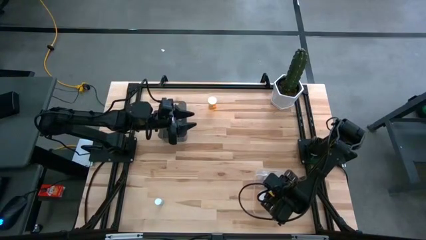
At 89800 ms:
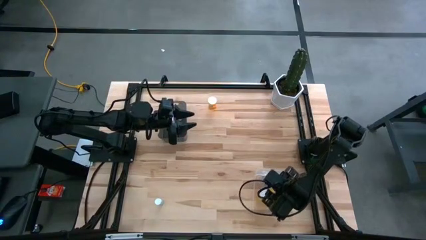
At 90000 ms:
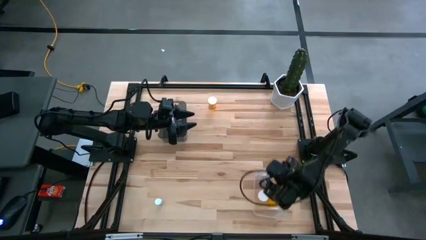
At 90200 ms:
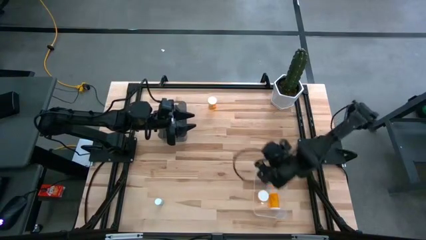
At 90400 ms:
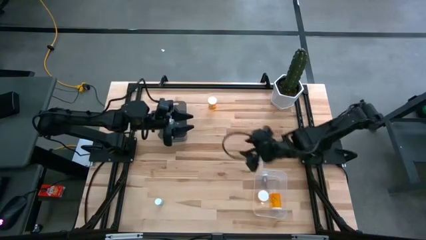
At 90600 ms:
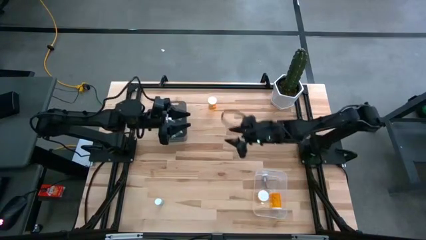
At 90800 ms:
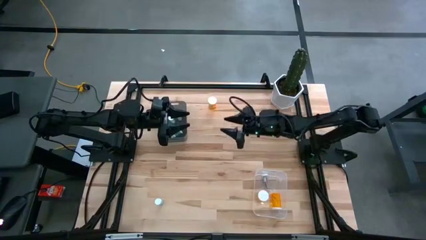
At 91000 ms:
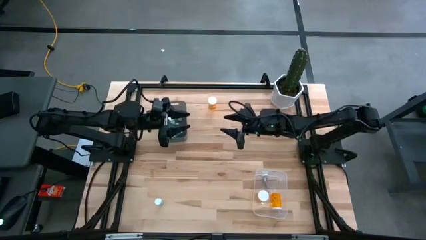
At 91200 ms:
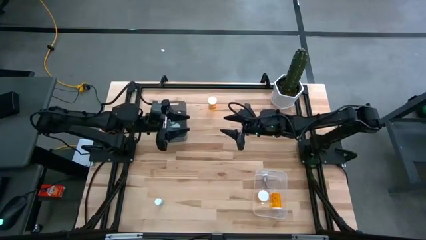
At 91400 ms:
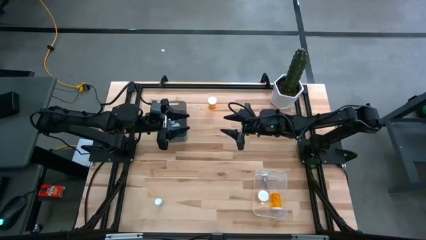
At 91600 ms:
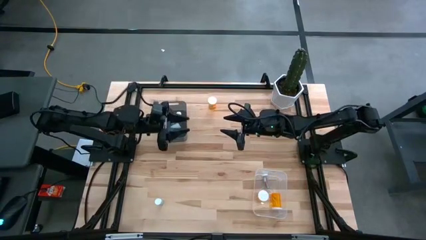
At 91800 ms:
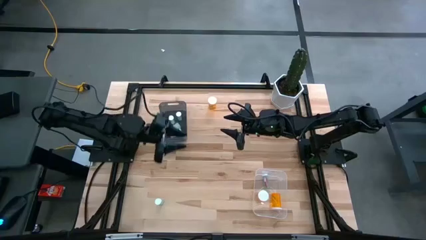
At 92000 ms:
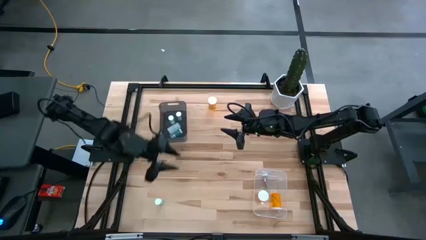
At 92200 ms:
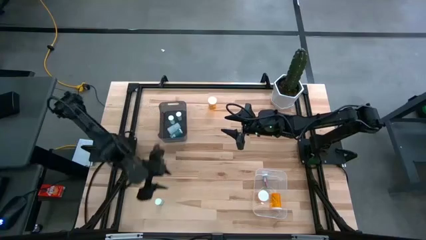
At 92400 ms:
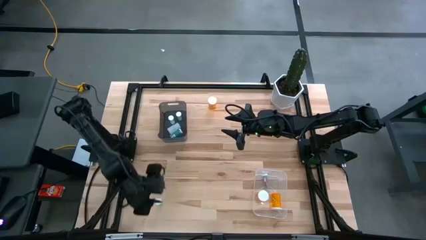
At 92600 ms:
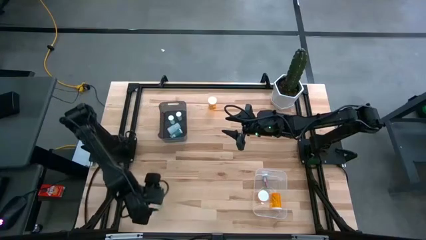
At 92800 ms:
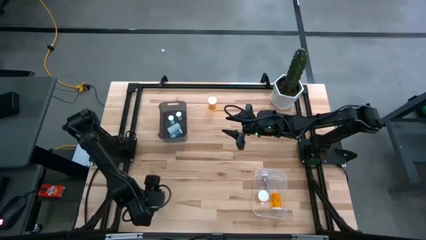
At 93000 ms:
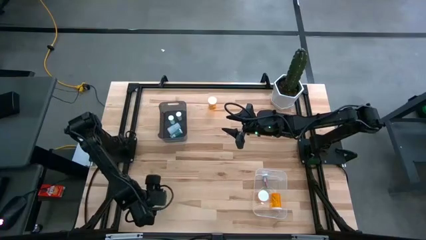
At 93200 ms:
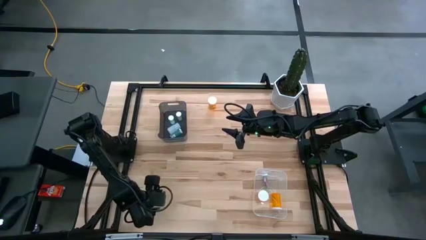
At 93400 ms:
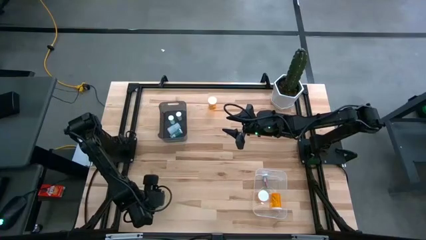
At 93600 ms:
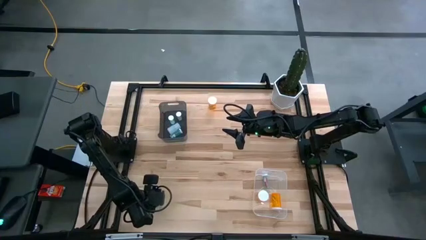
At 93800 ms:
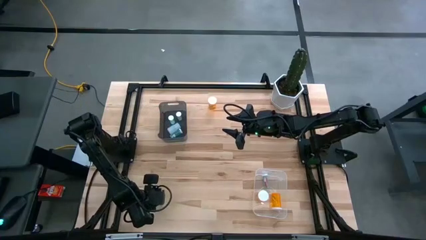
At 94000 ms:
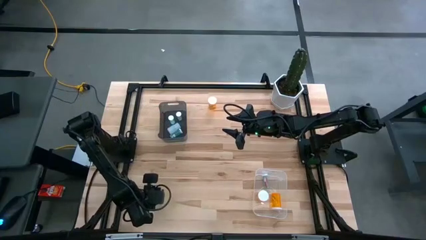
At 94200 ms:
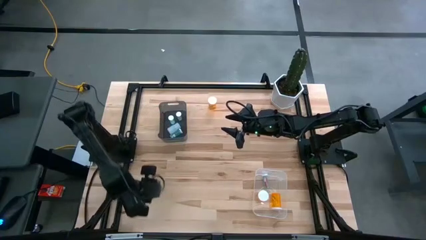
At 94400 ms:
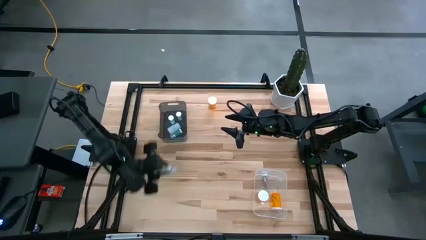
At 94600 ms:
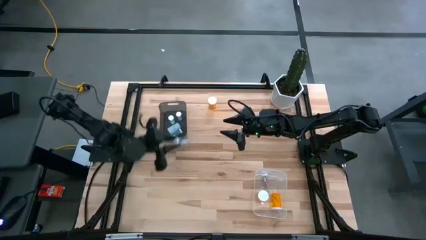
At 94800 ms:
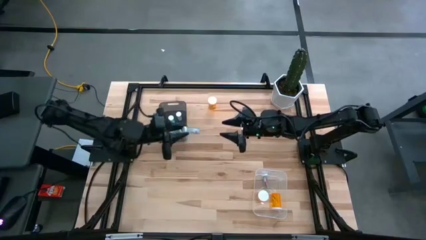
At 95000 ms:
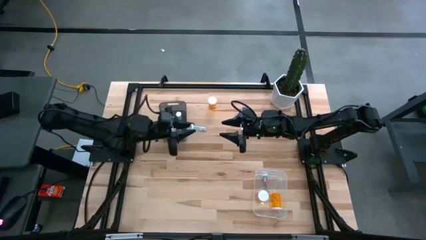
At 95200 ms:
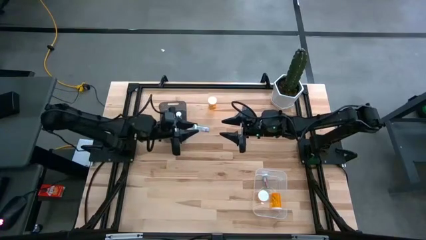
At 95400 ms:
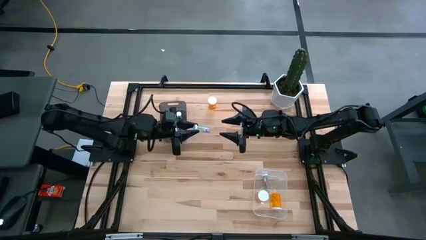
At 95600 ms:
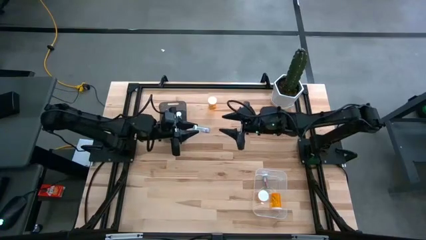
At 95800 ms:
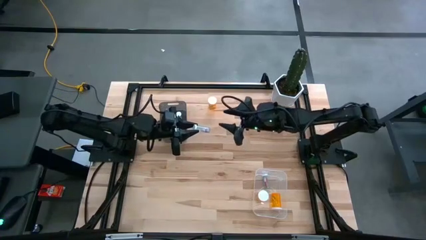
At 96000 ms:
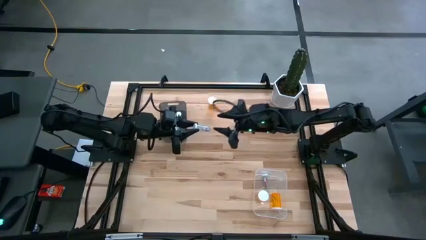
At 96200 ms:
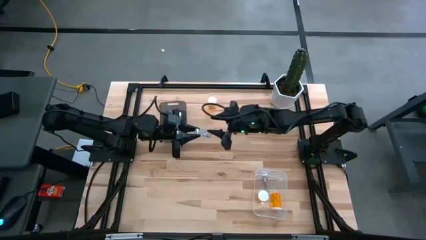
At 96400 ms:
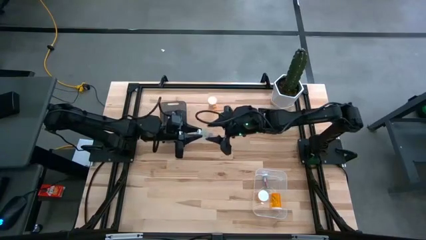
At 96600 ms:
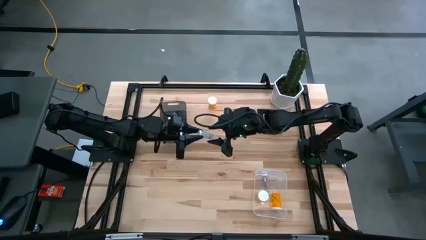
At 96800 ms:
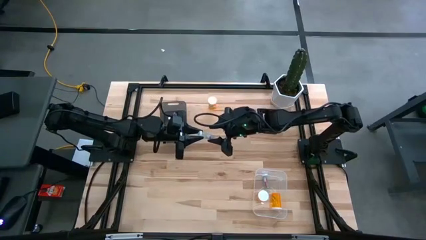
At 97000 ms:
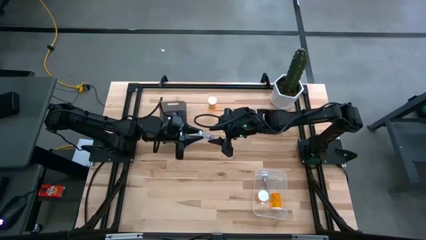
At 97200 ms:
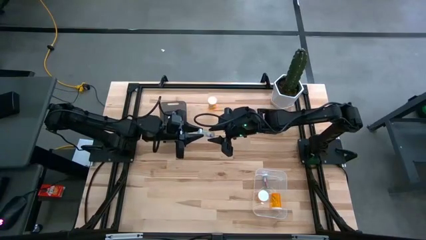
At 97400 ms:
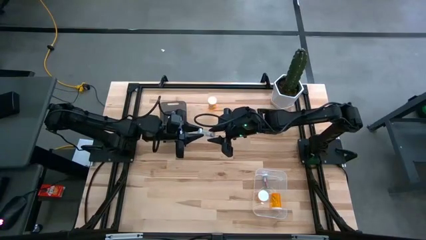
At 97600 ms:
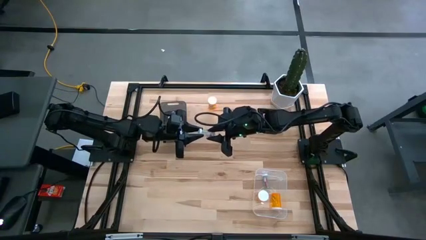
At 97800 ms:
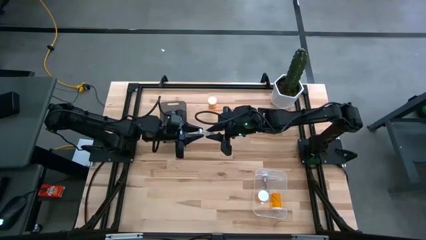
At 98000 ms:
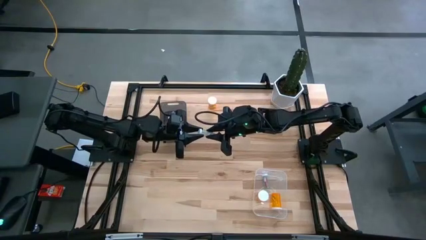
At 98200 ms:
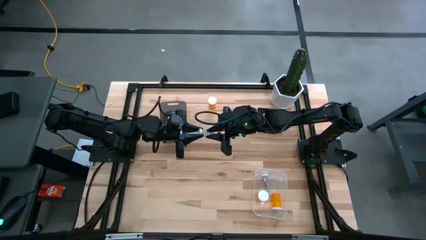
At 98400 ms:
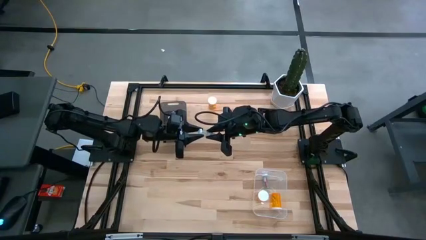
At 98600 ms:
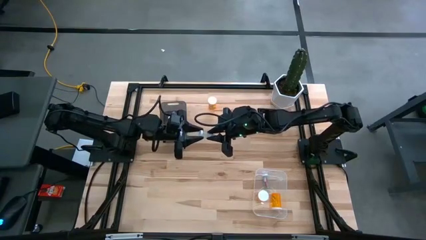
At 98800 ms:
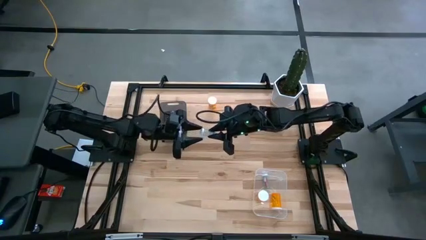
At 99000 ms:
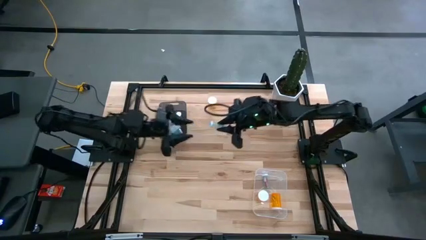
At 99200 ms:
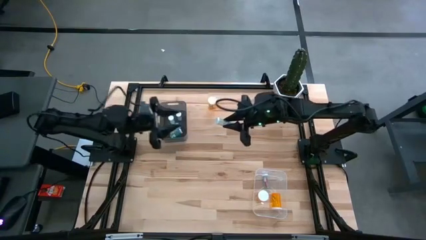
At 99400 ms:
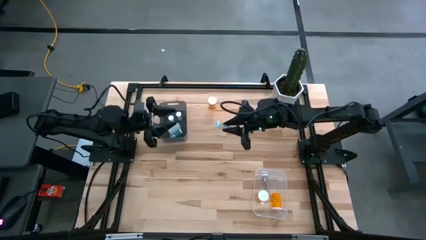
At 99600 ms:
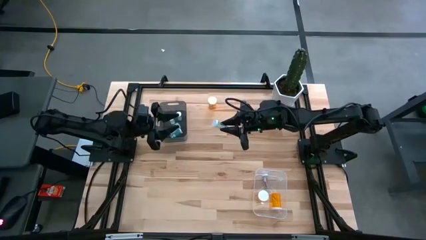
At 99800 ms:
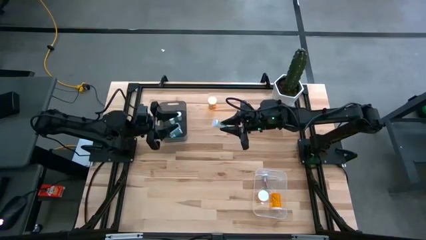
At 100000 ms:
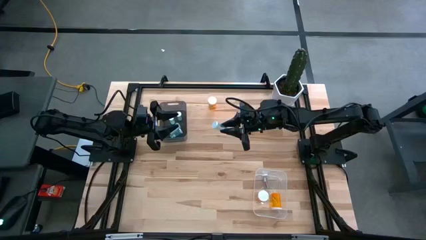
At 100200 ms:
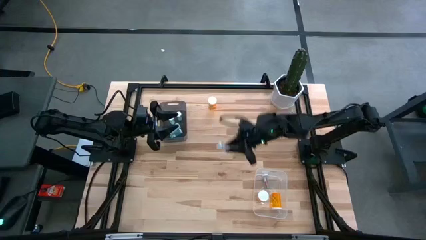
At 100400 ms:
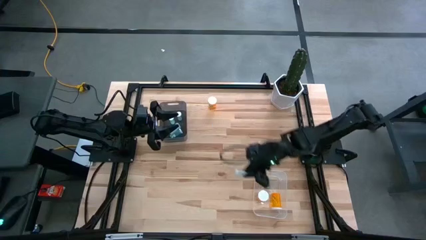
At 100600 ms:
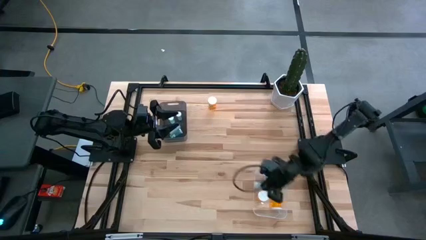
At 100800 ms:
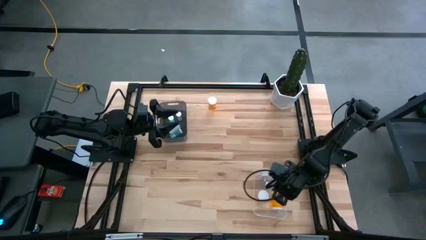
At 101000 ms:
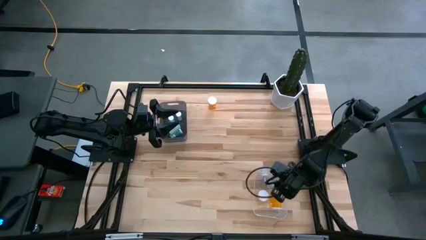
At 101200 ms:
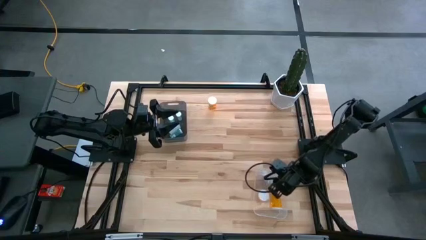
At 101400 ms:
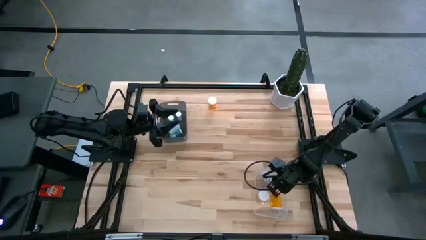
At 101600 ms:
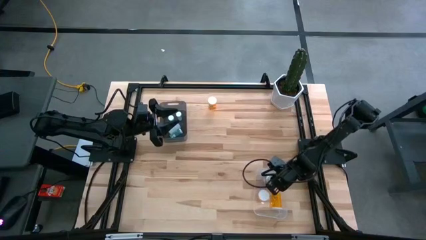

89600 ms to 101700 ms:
Task: Pick and place medicine bottles into bin by pill shape (circle, oval)
Put the small blue medicine bottle into the transparent bin
